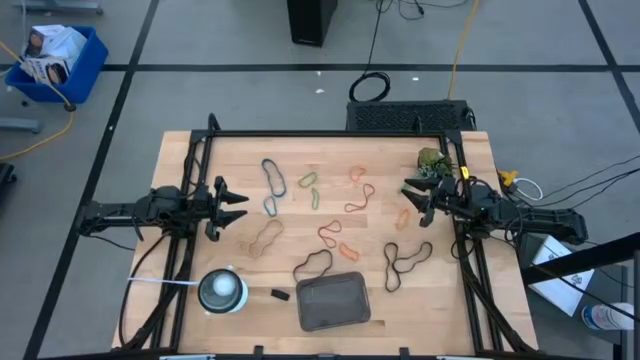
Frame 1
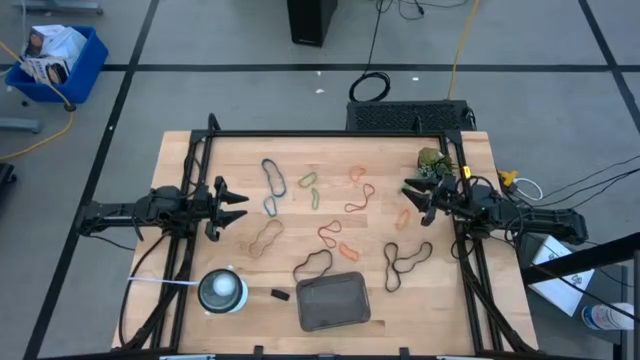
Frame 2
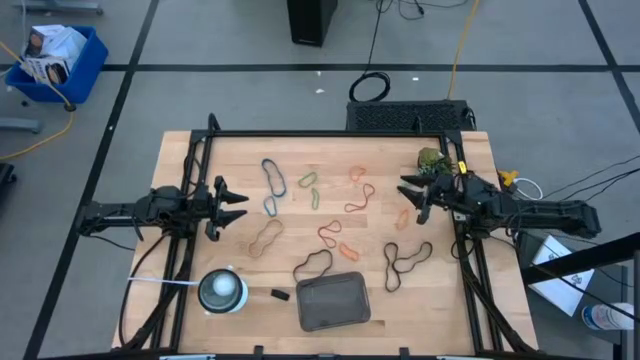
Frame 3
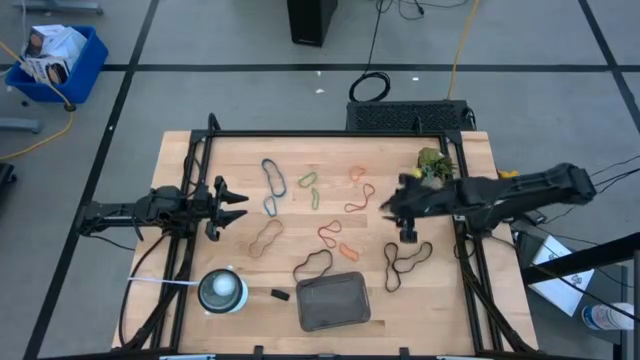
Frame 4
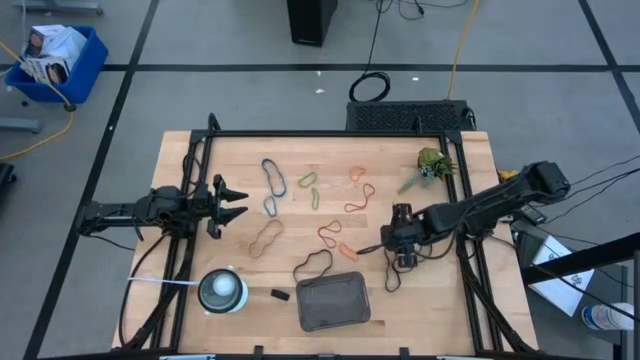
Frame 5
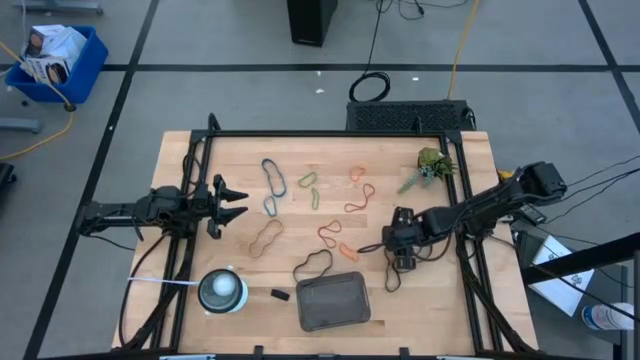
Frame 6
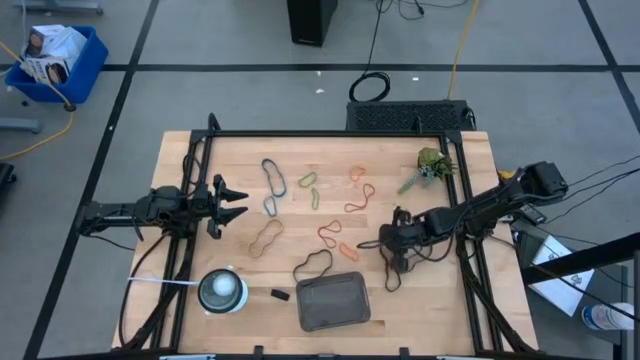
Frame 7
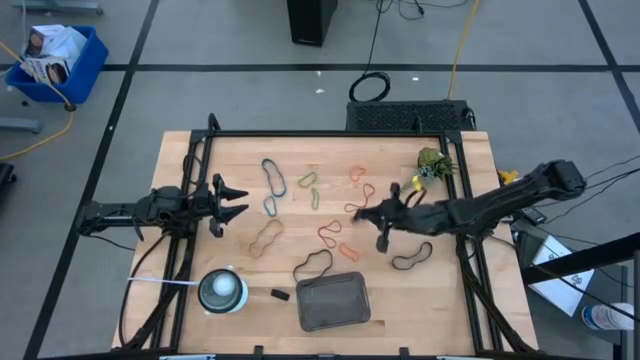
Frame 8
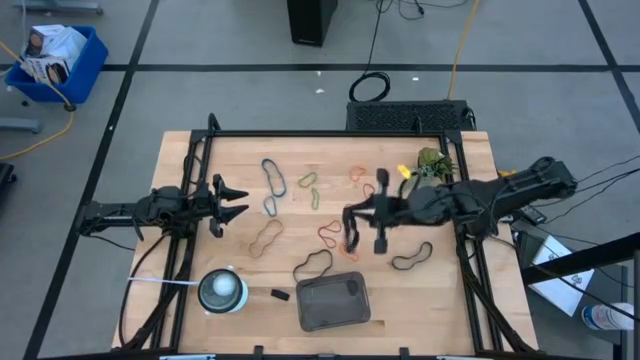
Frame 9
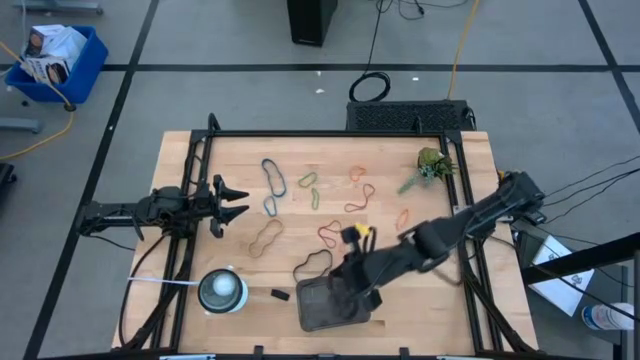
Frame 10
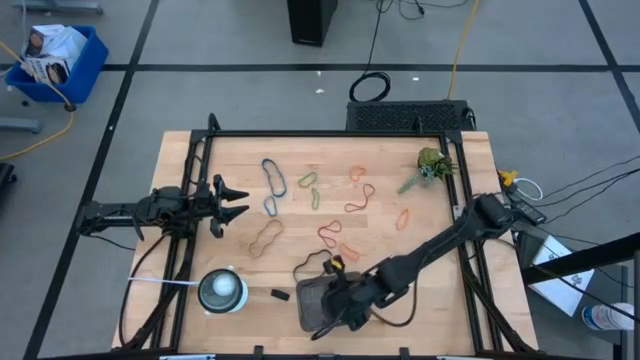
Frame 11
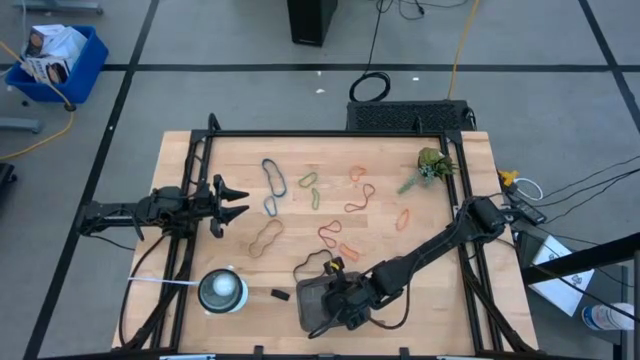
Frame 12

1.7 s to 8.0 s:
Task: Pick and place rubber bands into bin
Put the top middle black rubber band into the bin

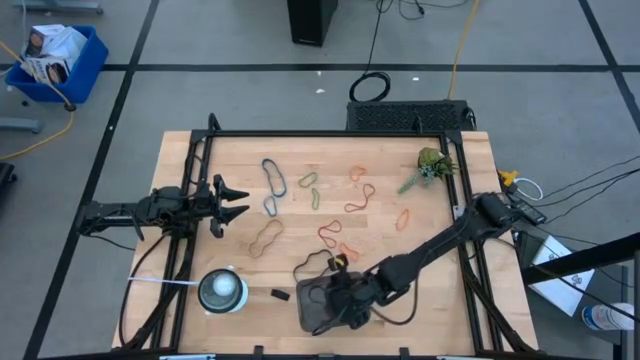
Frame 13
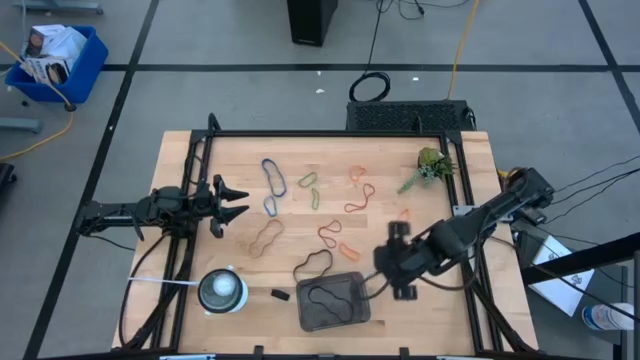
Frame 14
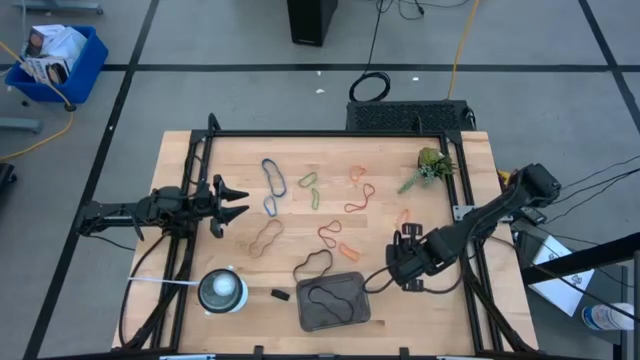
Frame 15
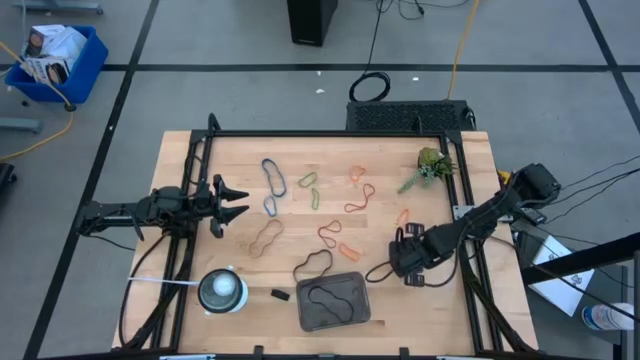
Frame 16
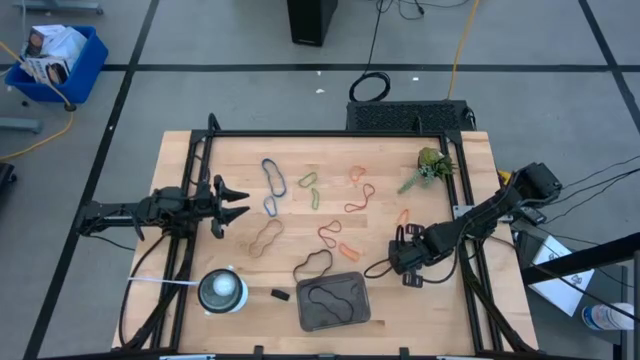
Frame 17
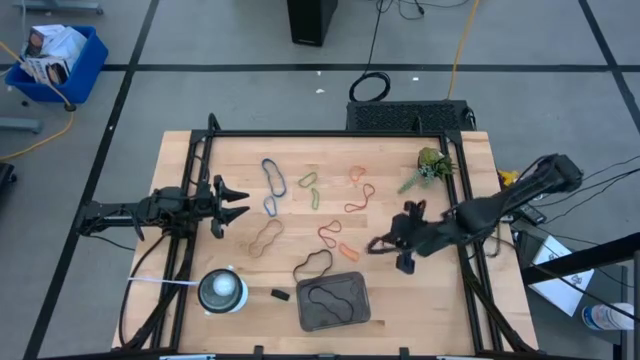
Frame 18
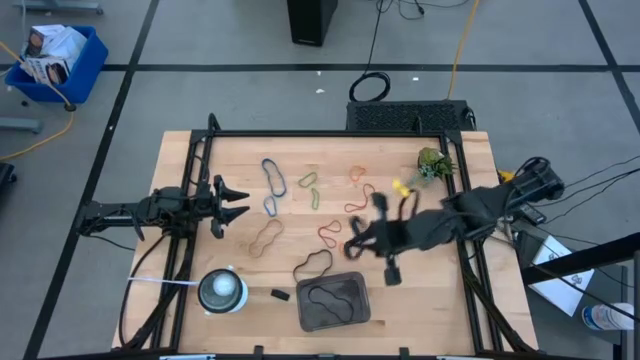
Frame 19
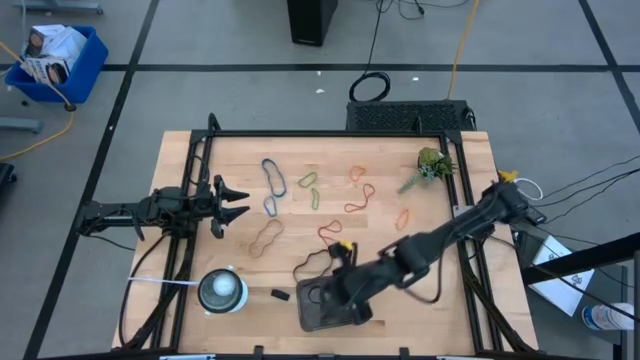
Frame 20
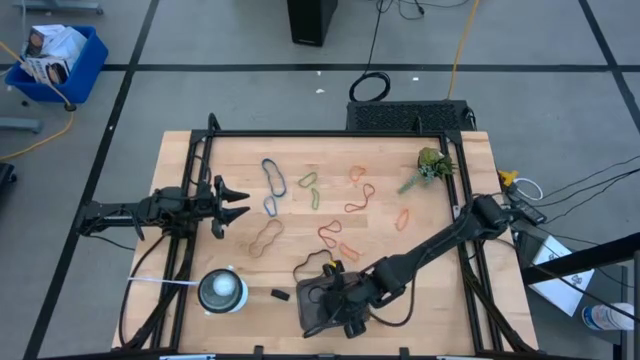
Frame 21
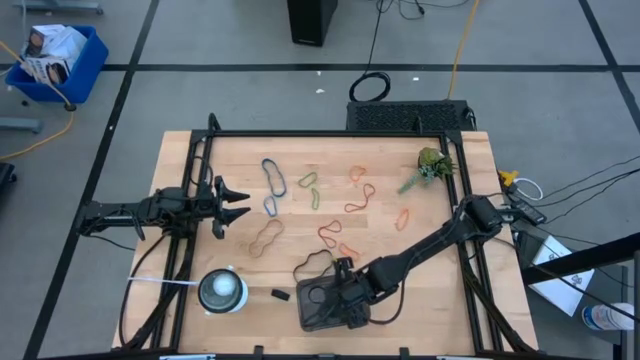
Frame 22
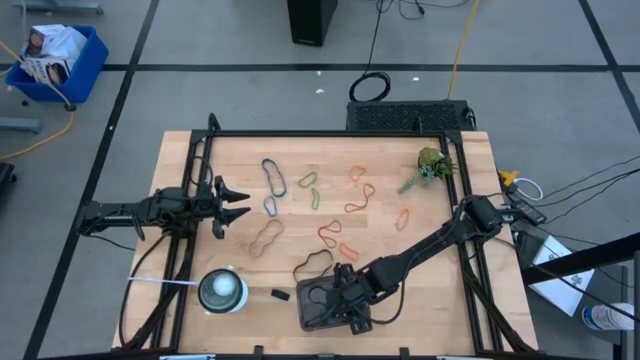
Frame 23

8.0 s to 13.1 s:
Put the top right black rubber band into the bin

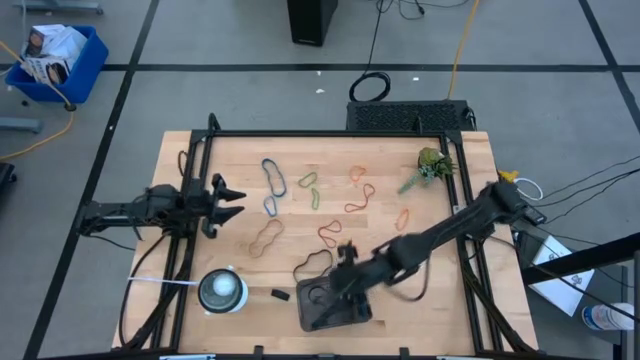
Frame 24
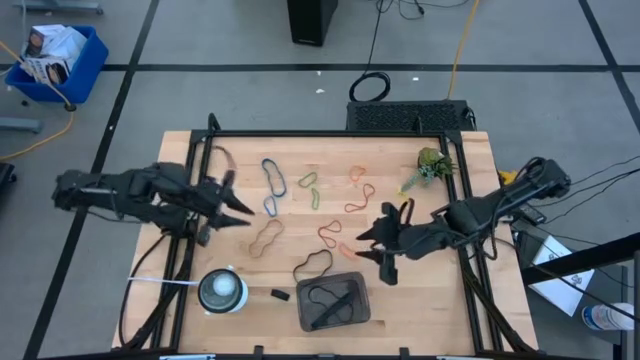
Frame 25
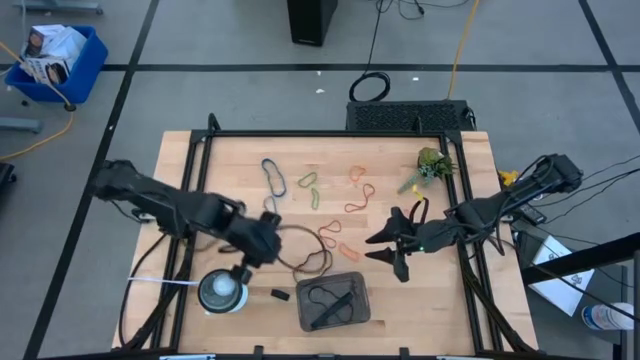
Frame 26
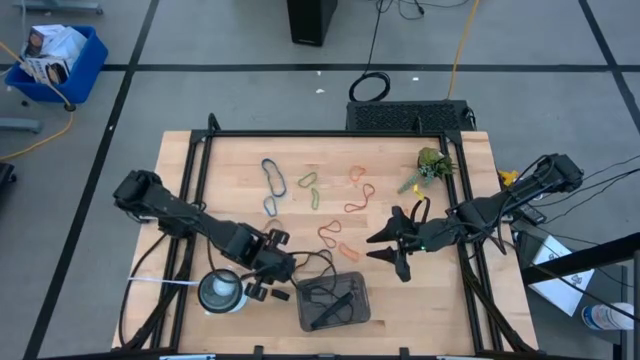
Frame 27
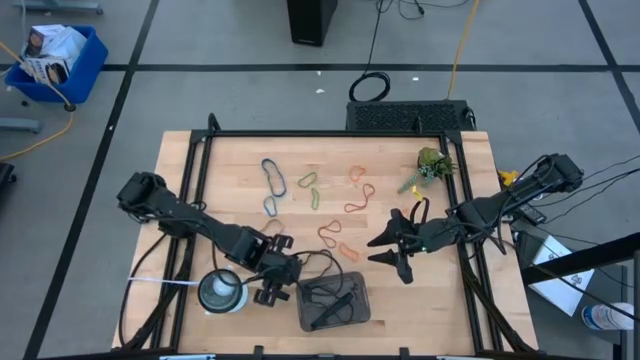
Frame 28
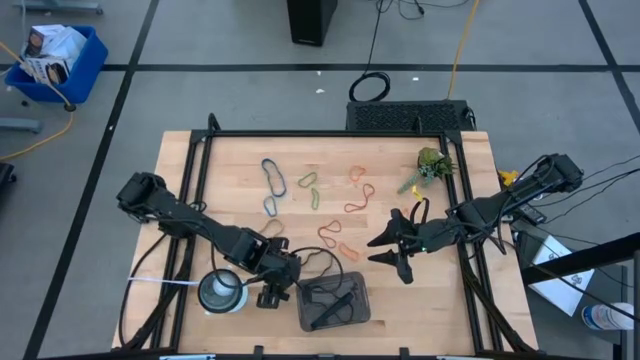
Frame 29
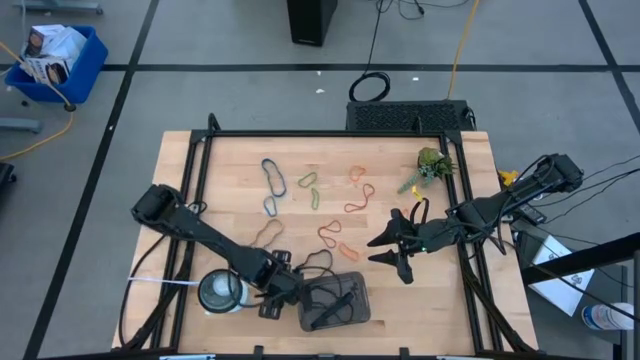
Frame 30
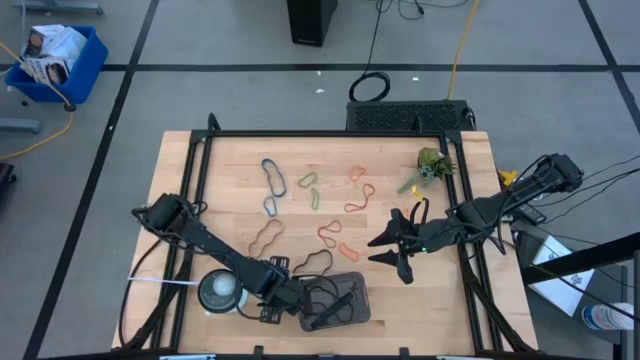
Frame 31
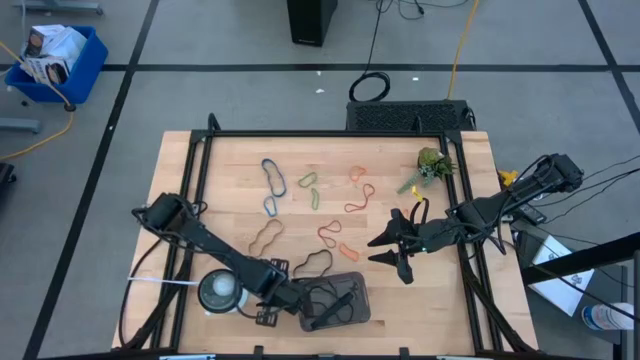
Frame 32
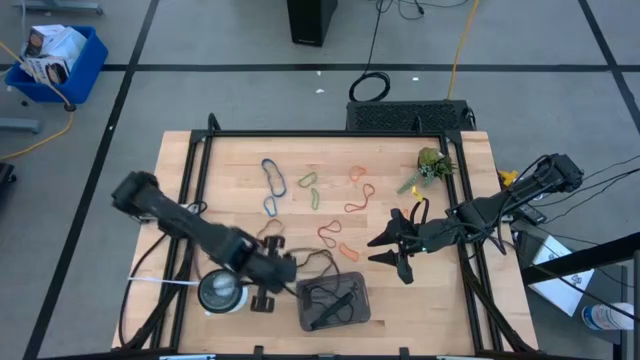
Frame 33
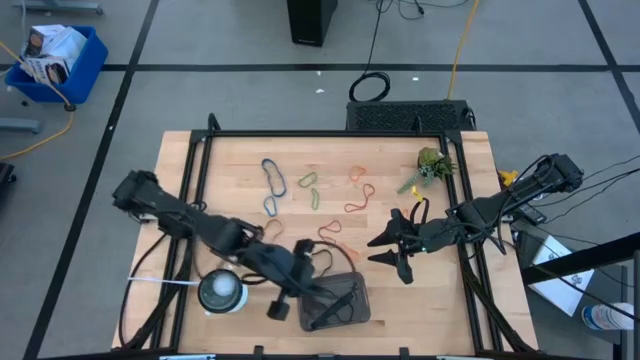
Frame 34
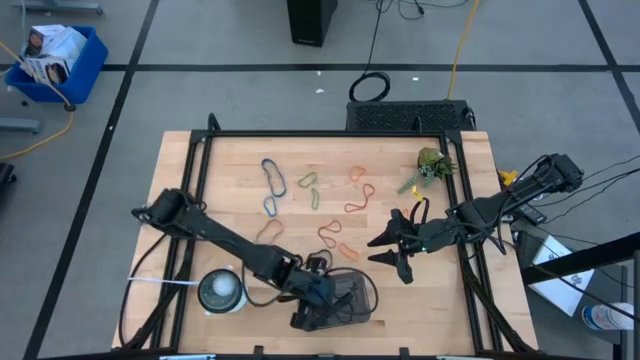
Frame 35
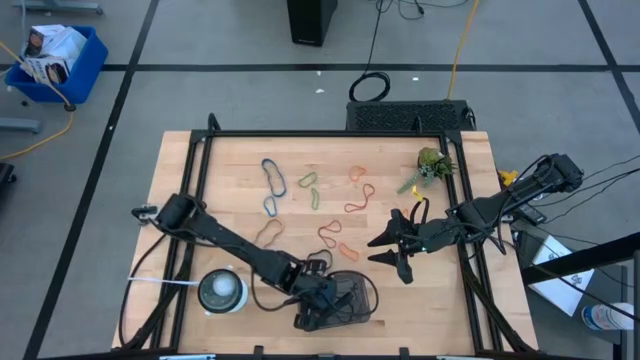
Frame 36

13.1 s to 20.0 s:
Put the bottom black rubber band into the bin

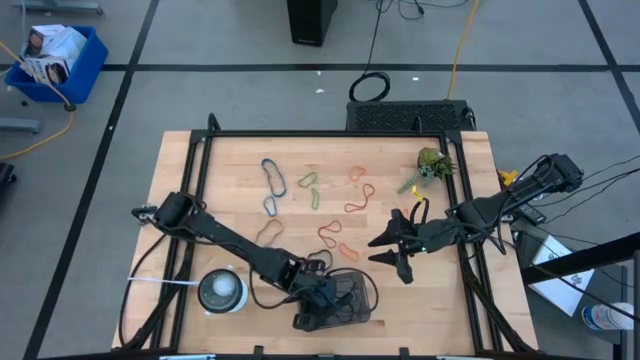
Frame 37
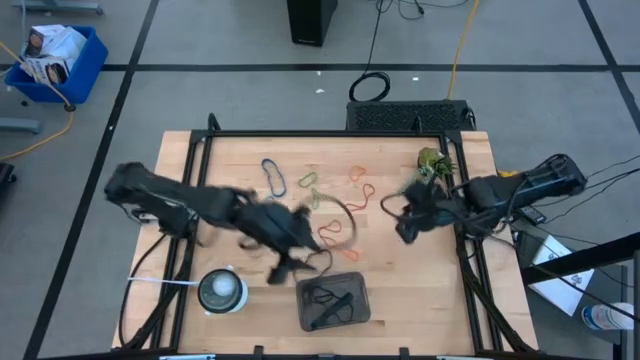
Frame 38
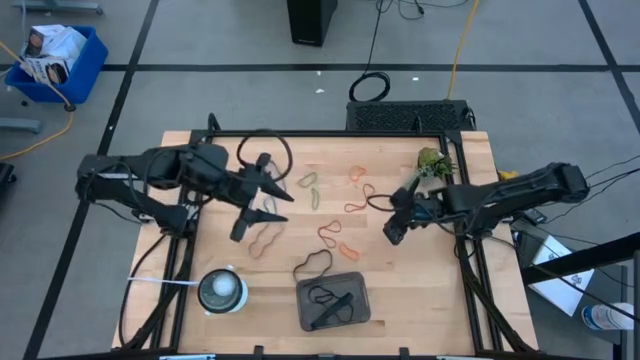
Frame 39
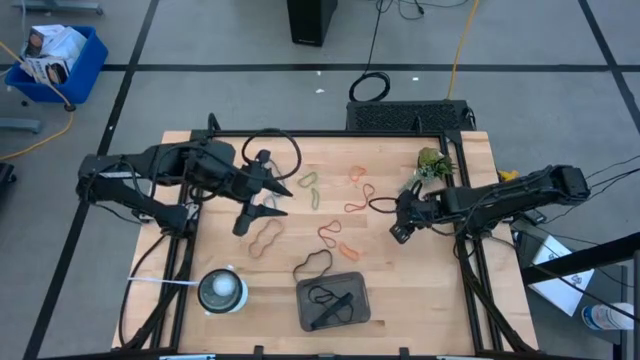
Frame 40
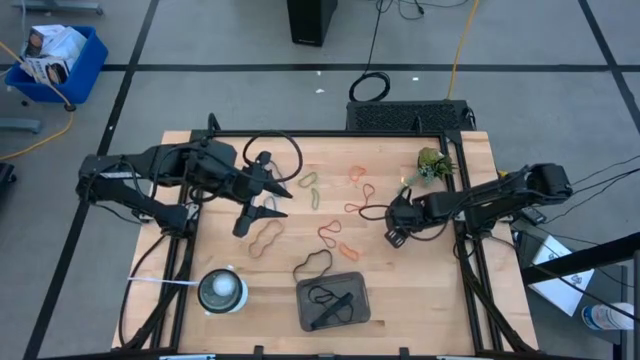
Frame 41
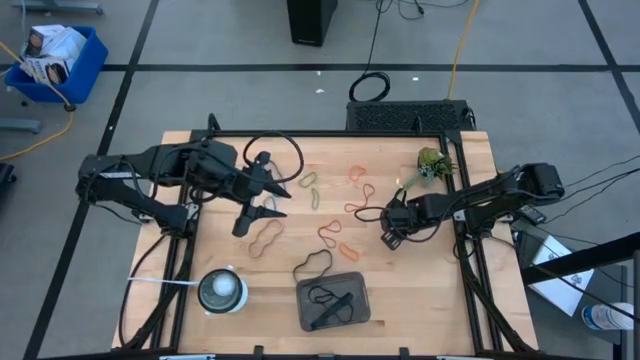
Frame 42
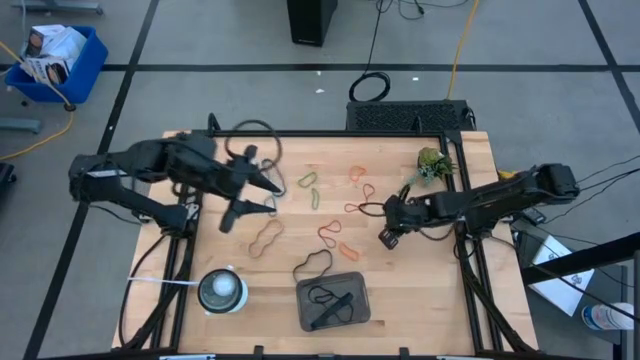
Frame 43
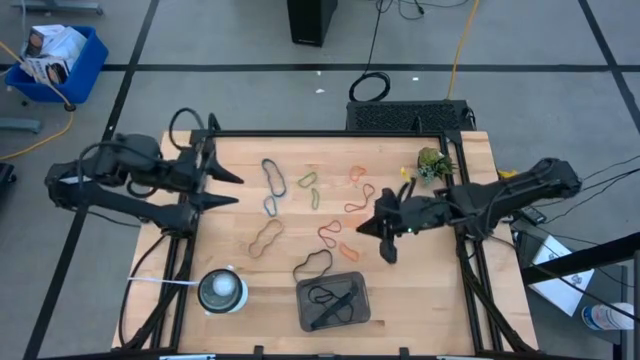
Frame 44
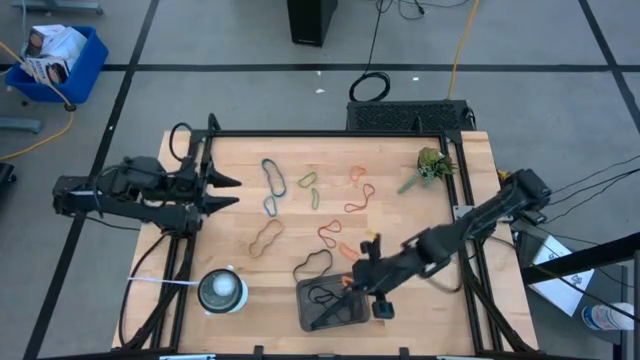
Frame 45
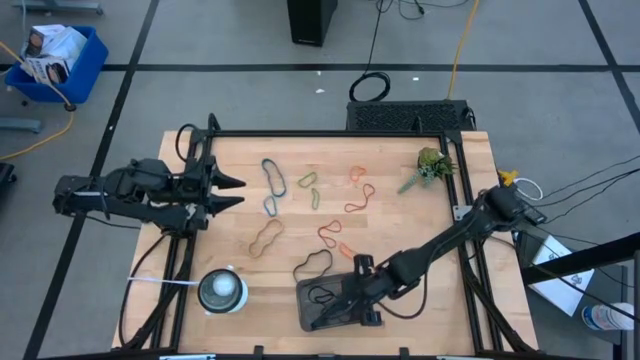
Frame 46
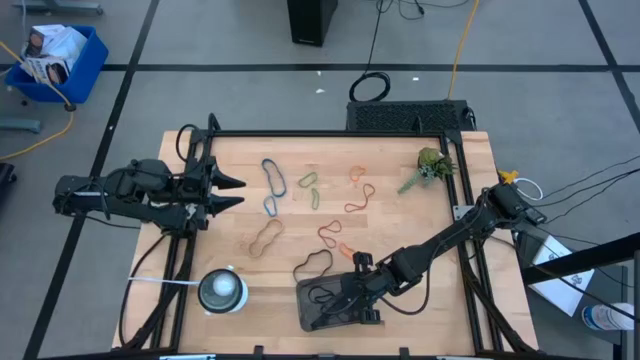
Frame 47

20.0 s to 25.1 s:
Put the middle orange rubber band into the bin
